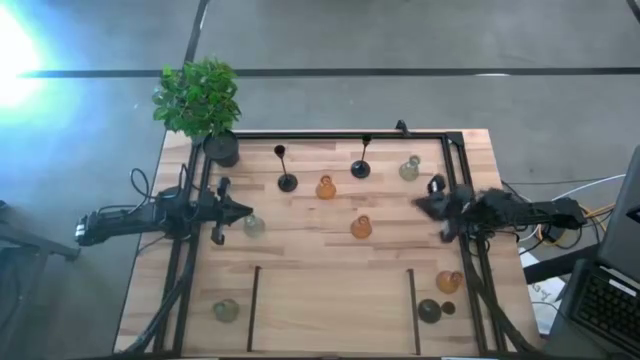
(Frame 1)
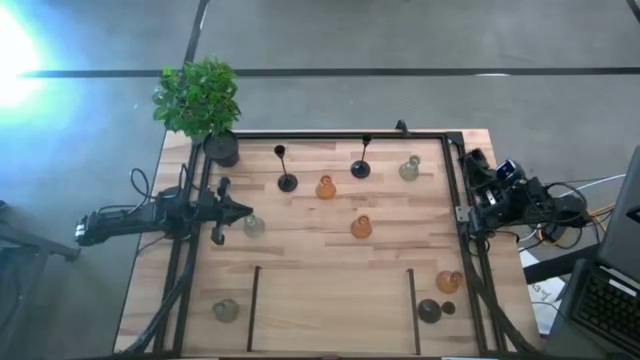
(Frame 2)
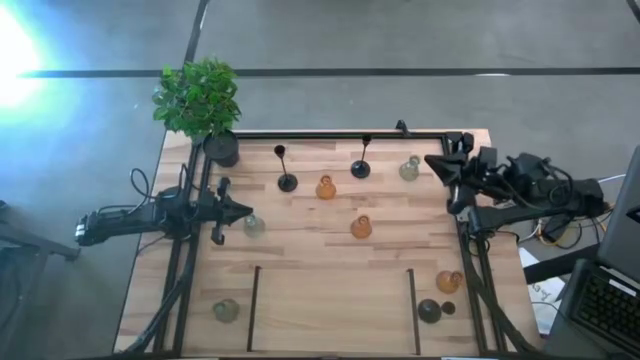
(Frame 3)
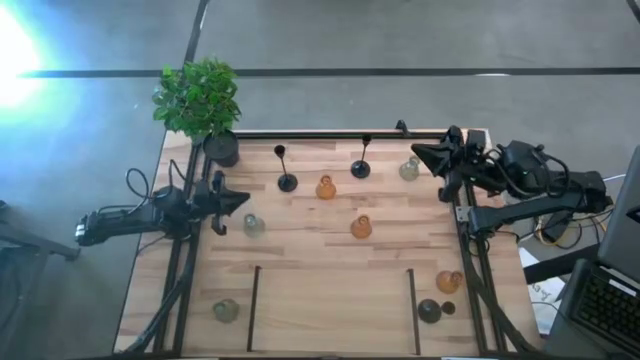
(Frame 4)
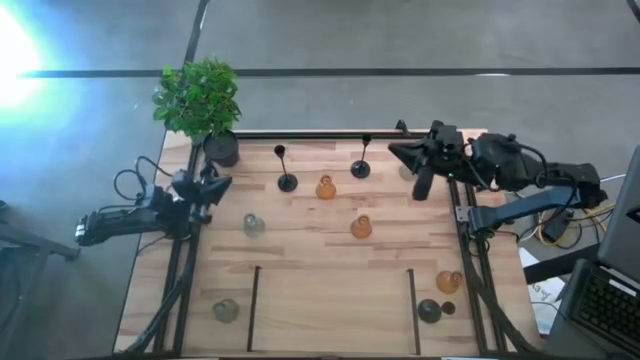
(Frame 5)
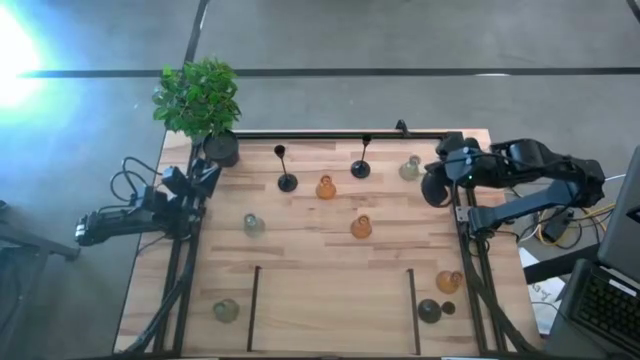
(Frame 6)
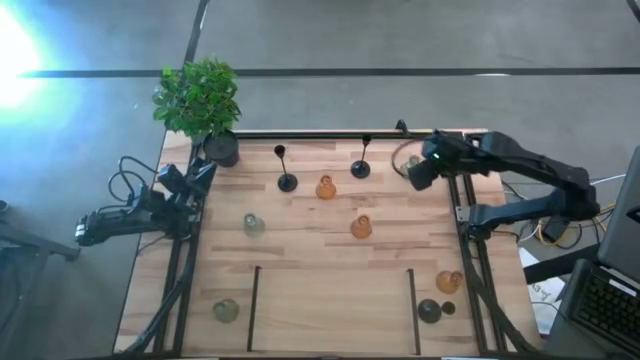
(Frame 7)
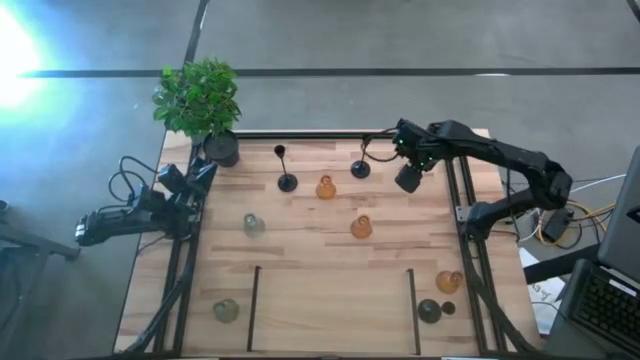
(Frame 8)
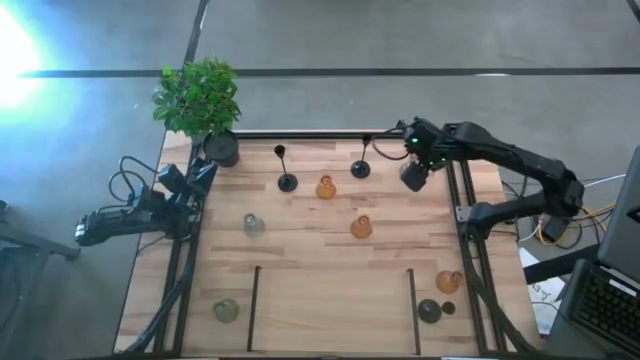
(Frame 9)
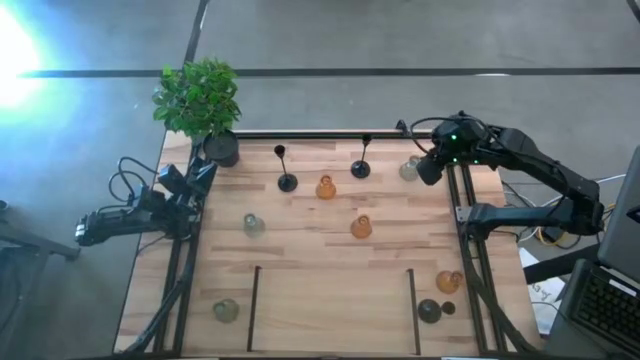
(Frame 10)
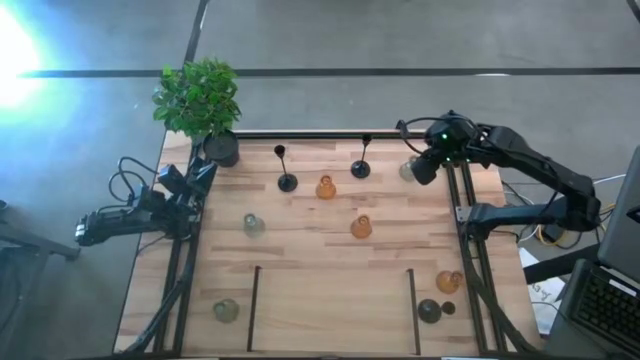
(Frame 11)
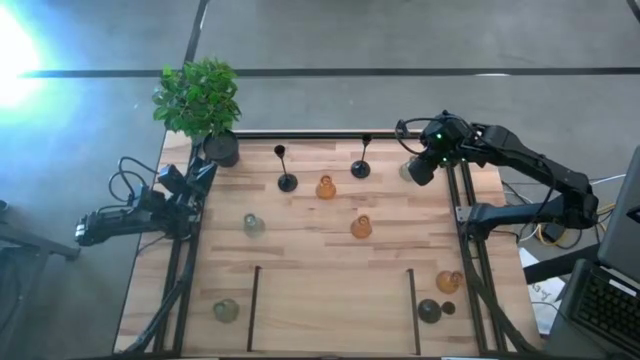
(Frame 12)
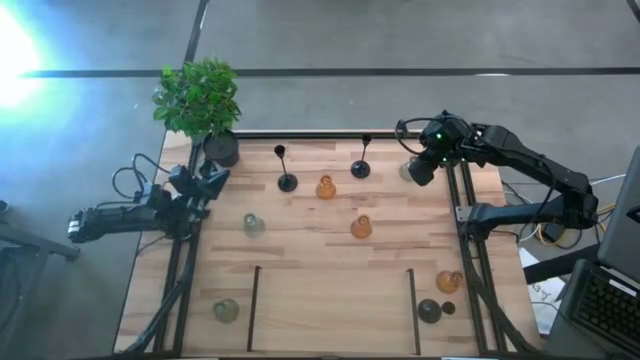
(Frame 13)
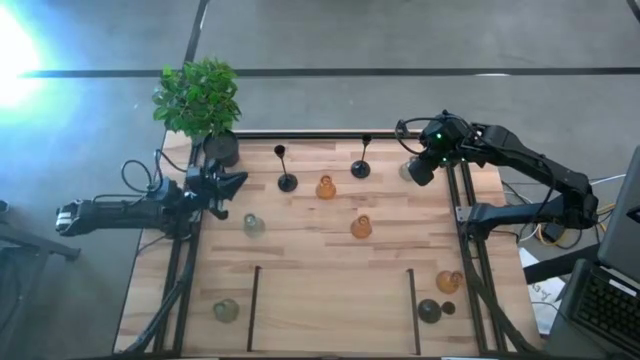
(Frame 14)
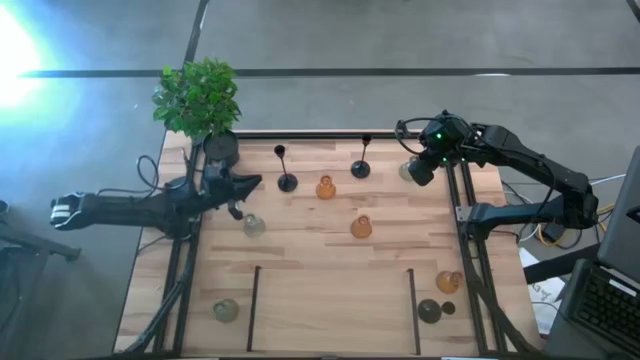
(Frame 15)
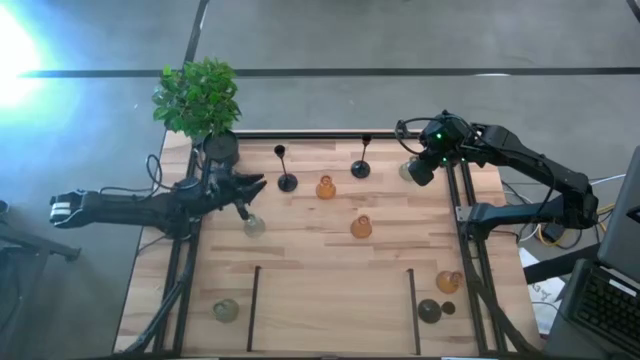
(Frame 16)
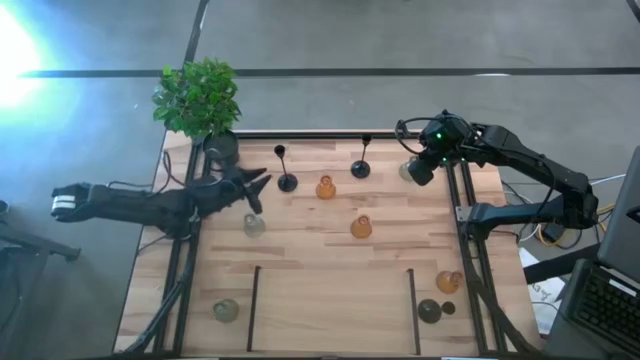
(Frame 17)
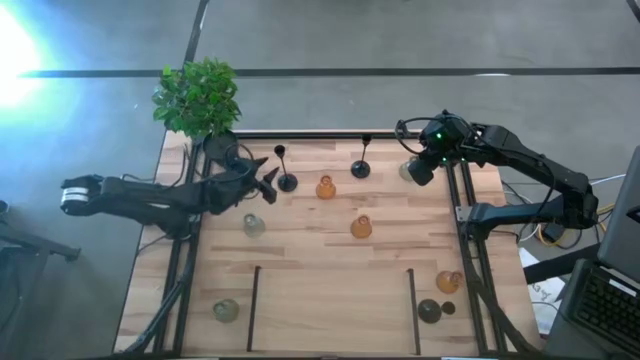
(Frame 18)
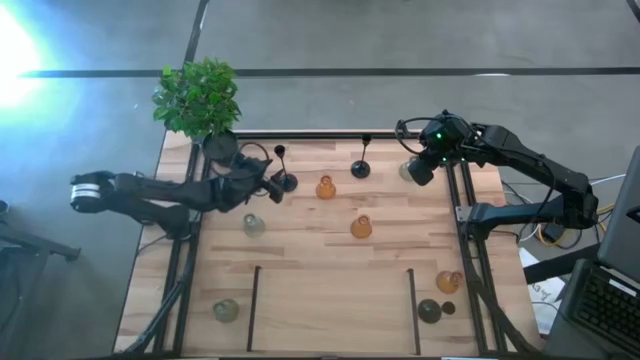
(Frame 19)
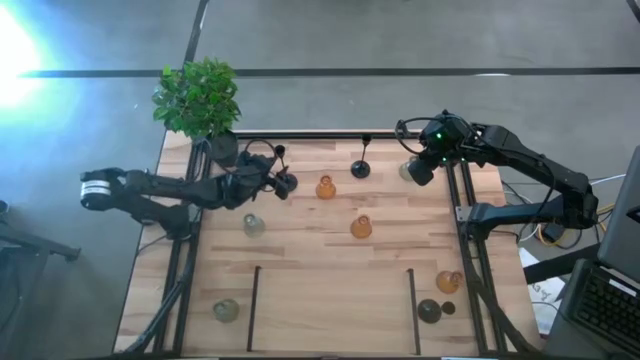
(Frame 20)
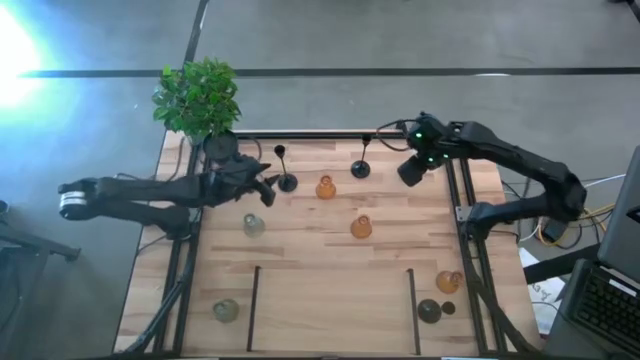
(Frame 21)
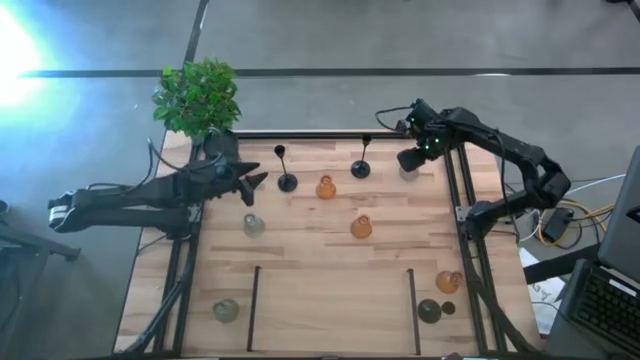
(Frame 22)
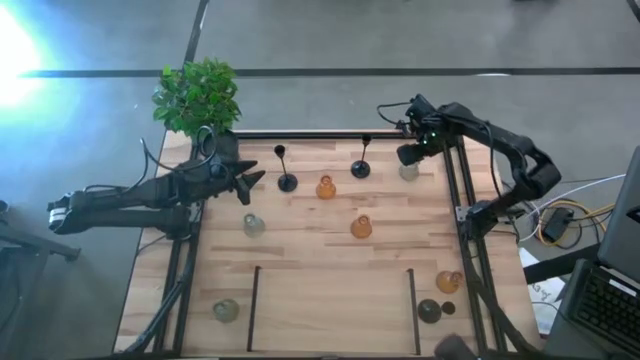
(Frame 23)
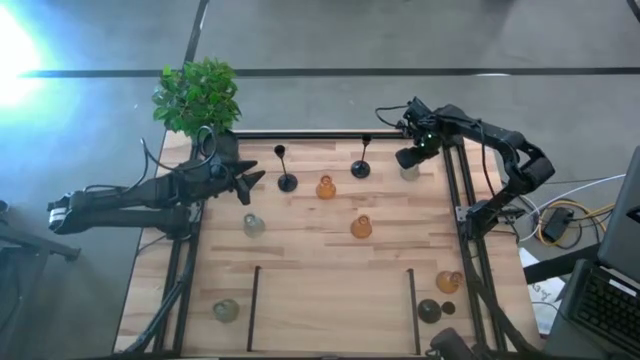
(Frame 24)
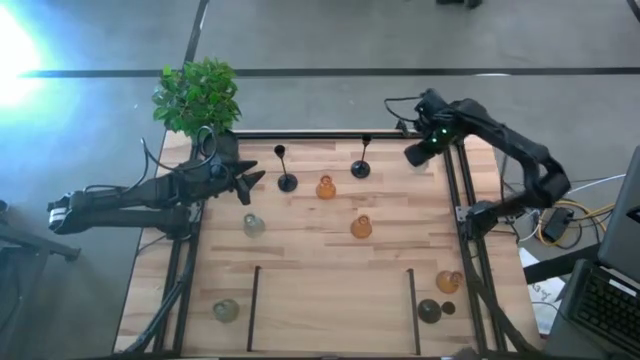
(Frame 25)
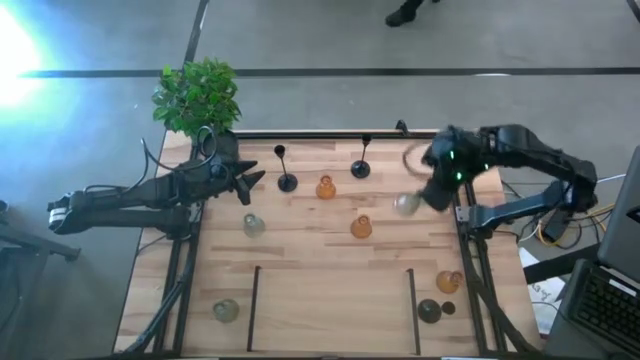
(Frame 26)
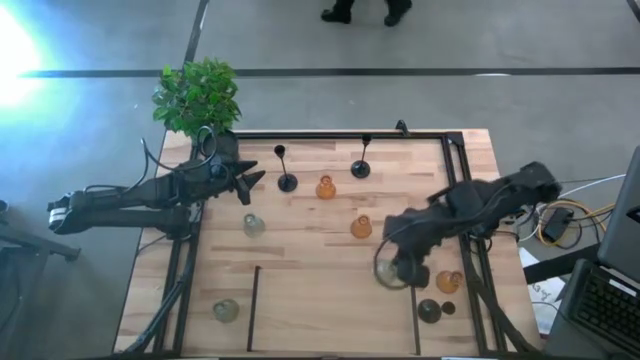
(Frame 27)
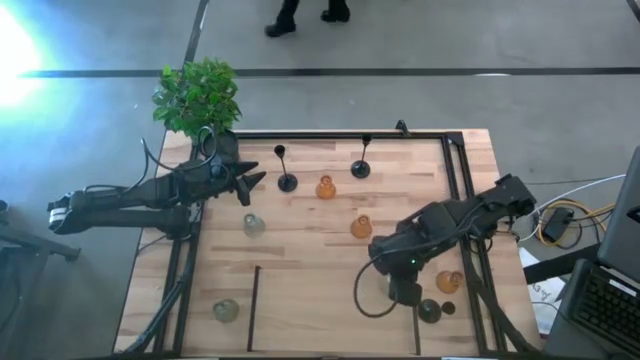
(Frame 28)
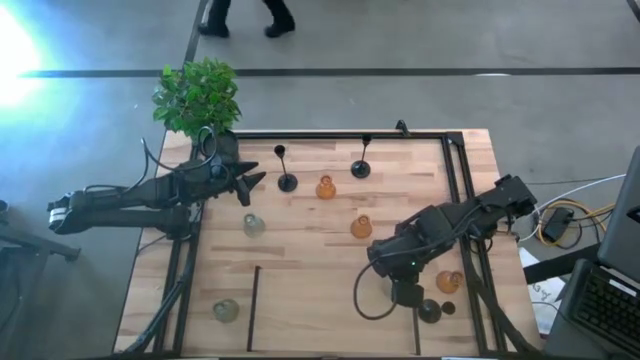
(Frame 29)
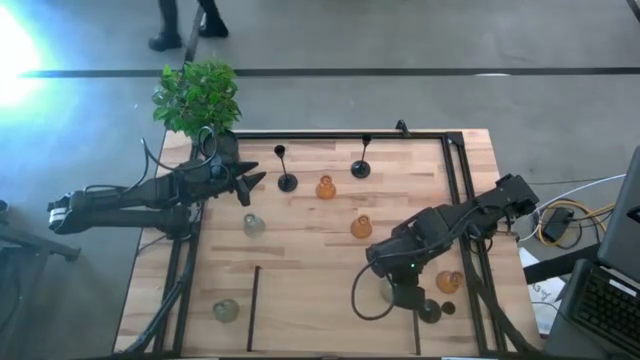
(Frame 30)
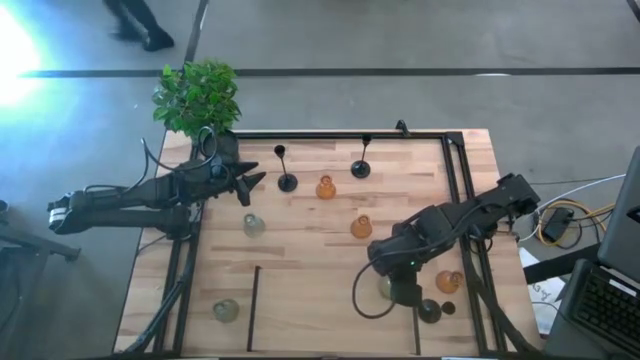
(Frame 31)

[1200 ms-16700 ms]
Task: Pick & Place candle stick holders
Put the top green glass candle holder on the shelf

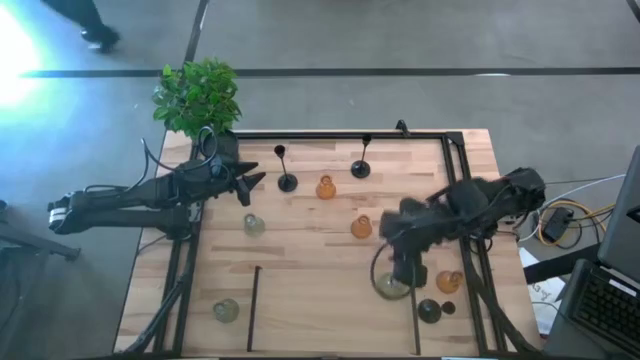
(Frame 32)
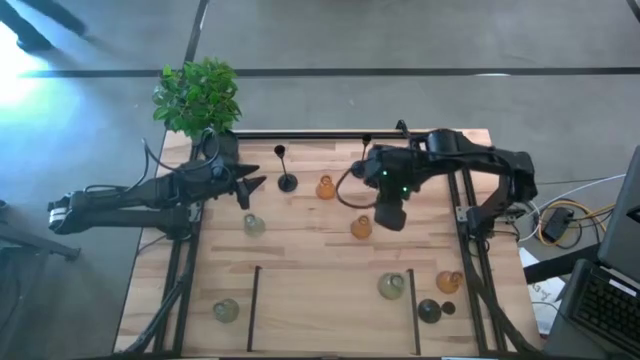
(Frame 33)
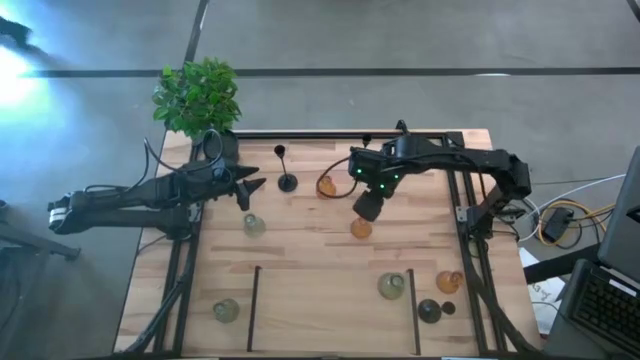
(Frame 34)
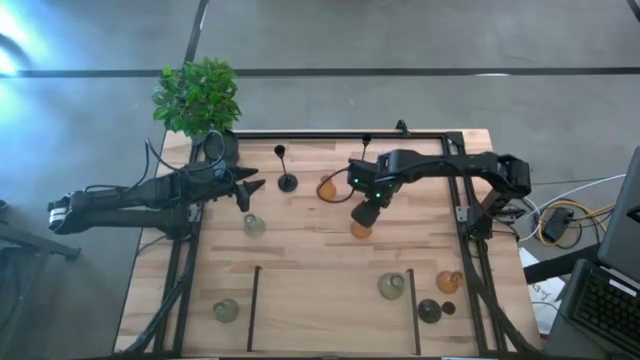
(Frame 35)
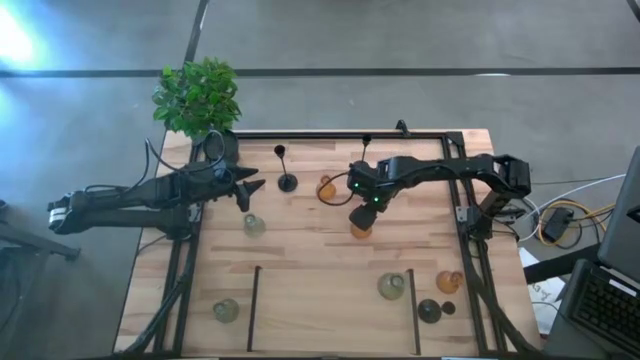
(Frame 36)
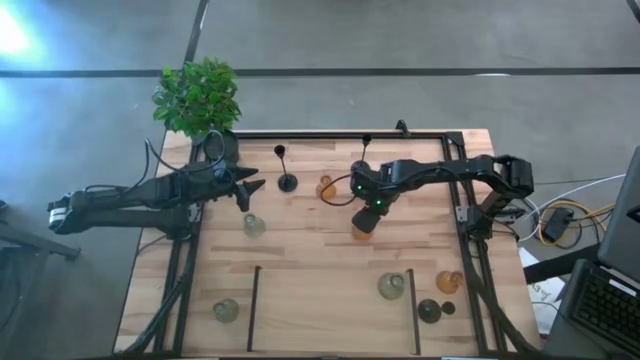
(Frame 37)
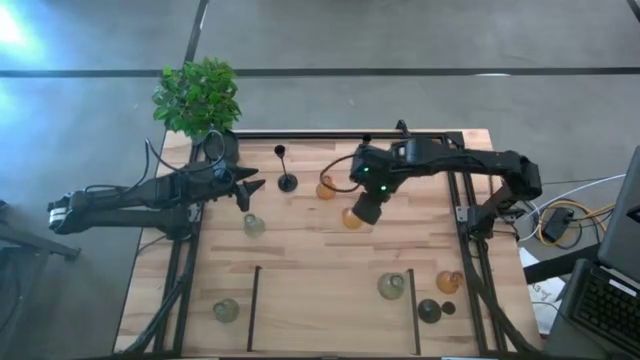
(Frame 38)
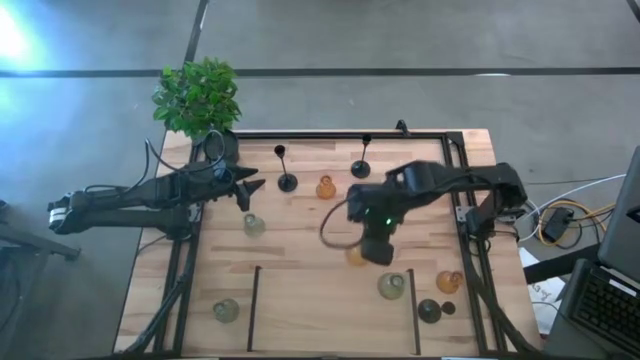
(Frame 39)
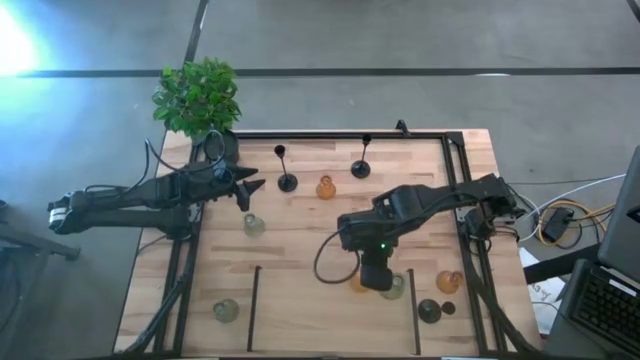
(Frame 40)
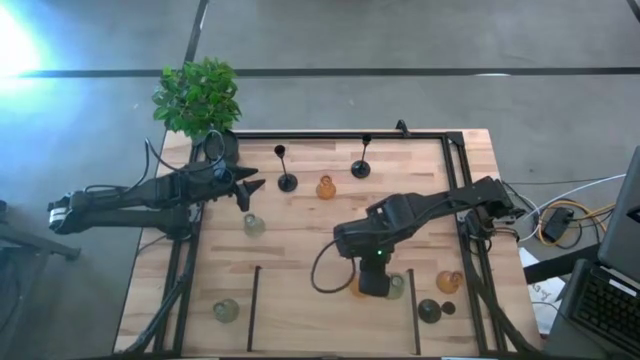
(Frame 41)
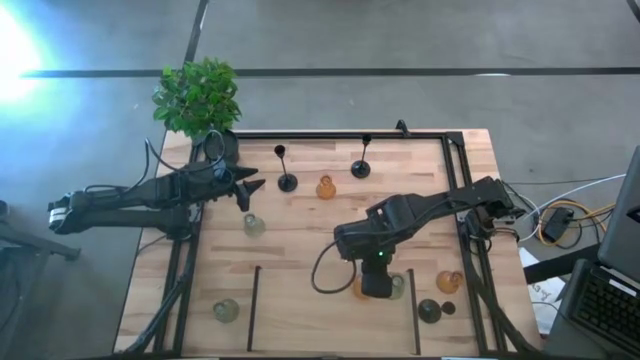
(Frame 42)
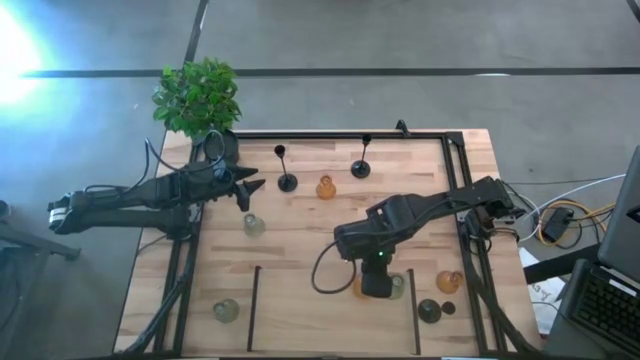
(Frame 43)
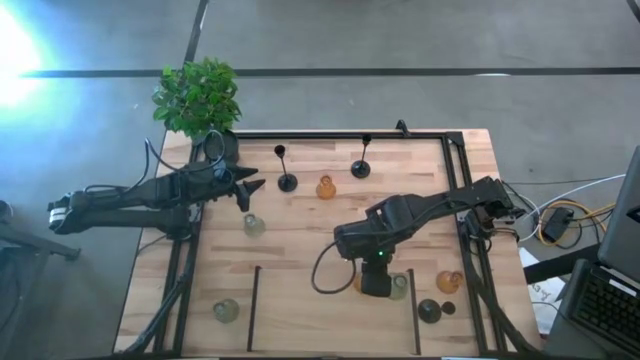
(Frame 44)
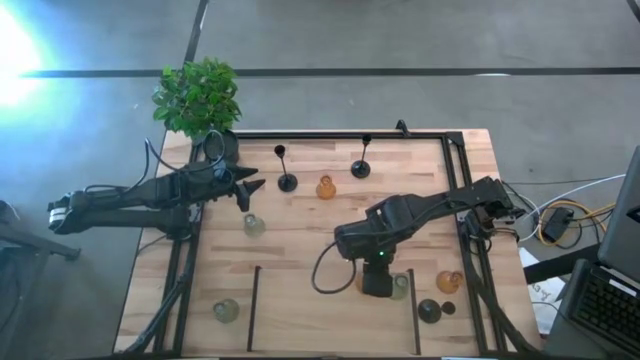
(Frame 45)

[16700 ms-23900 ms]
Put the middle orange glass candle holder on the shelf
